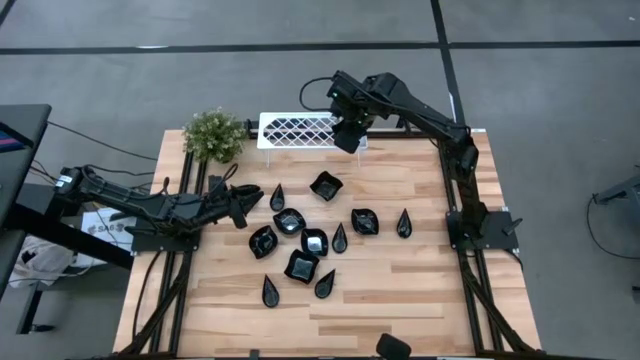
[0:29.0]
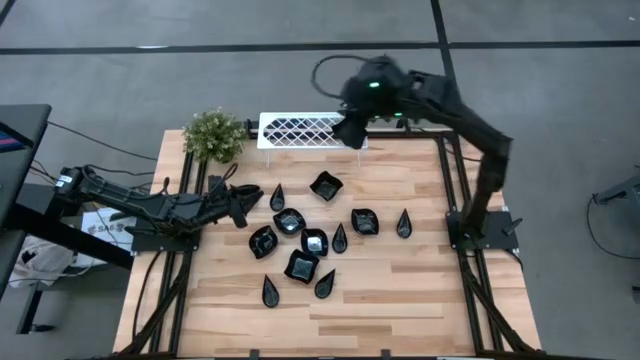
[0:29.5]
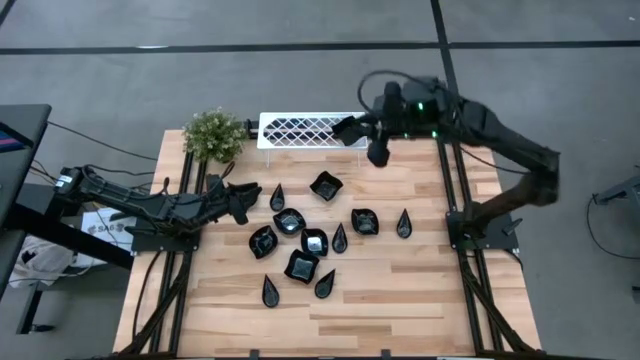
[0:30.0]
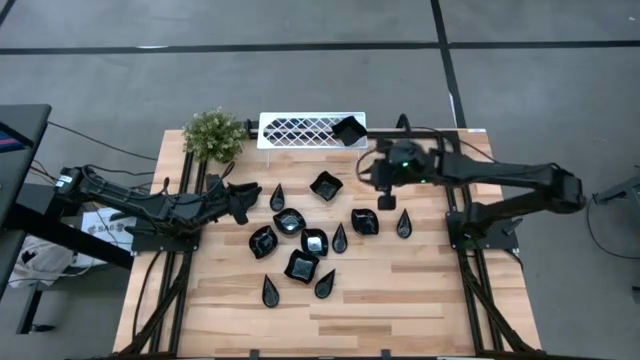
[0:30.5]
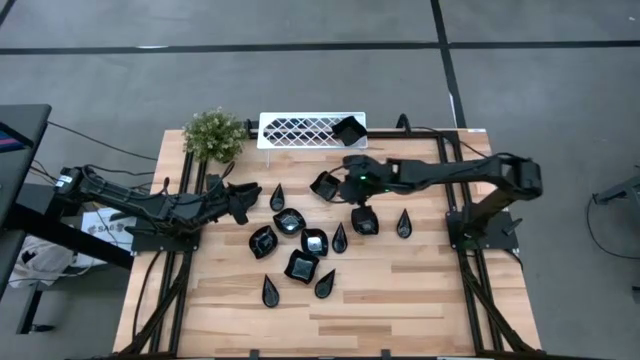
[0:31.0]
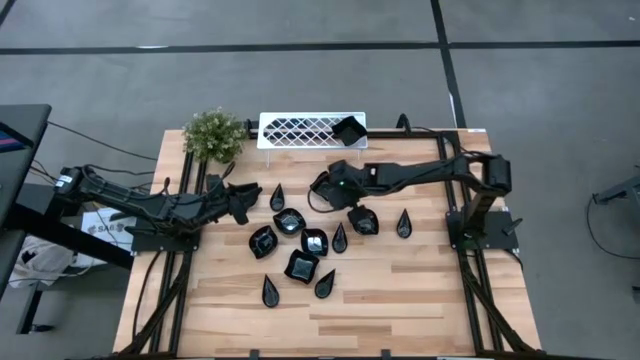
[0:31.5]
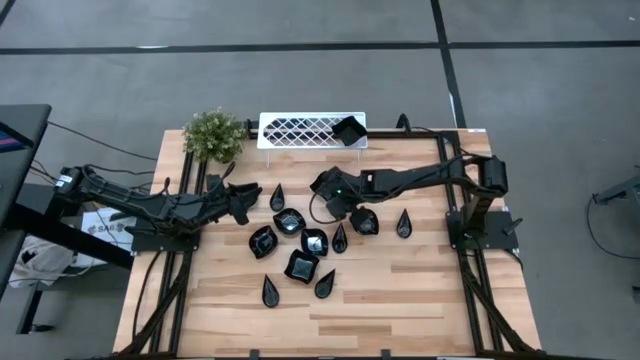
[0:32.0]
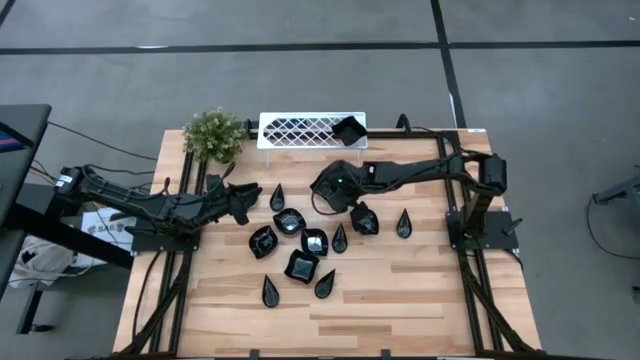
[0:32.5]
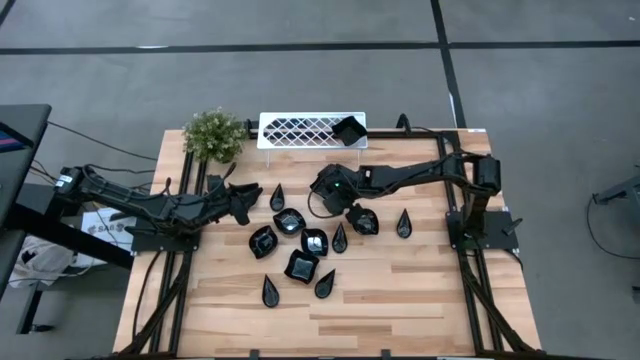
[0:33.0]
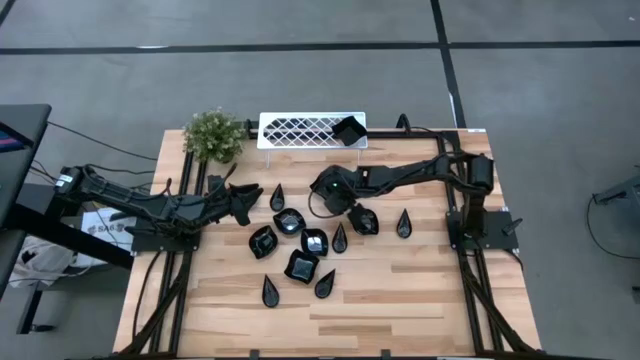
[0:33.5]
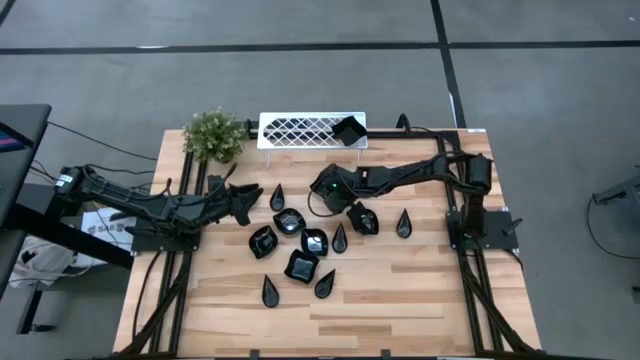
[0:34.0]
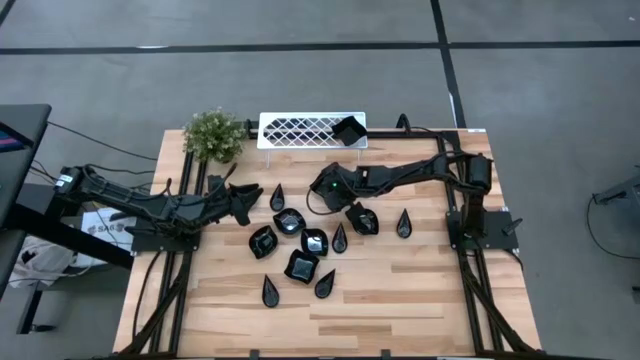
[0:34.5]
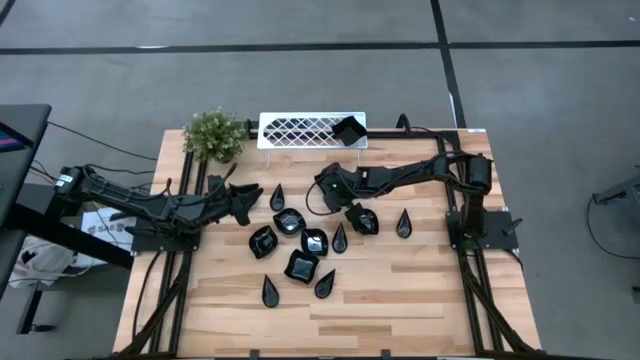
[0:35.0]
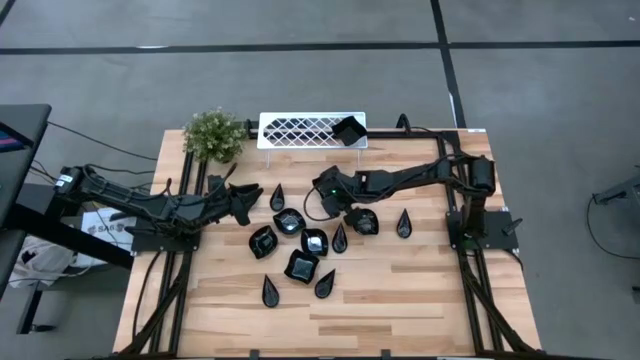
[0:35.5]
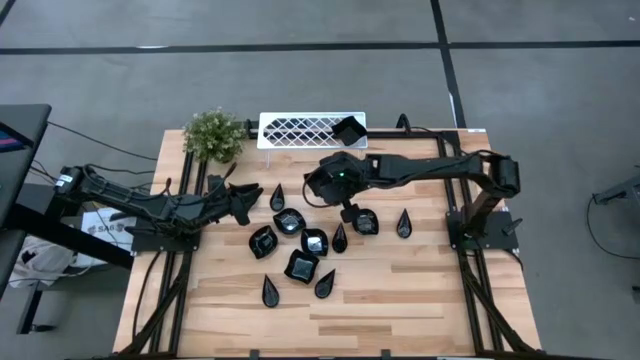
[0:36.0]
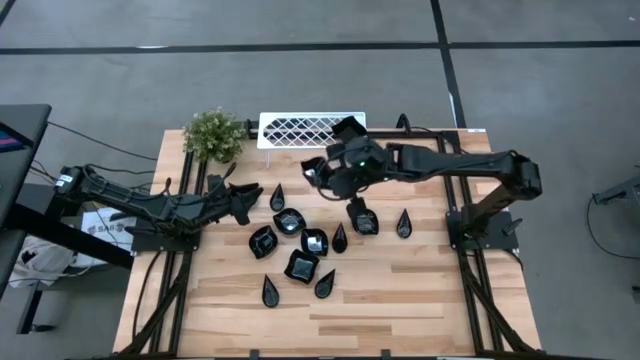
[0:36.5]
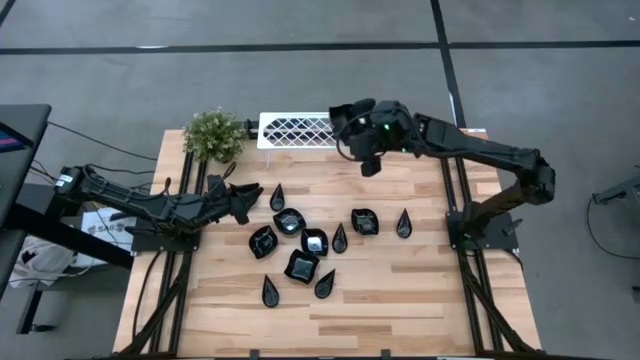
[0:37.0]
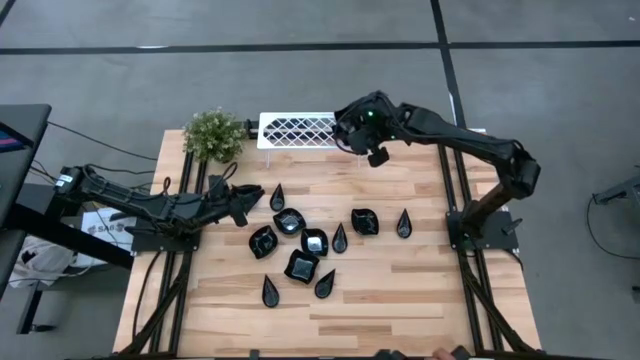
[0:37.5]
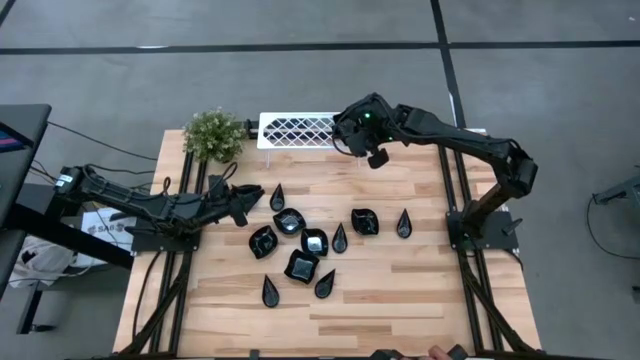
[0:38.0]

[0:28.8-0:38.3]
Task: Pick & Place Mini shaped plates
Stack the top right distorted square plate on the top of the distorted square plates on the shelf

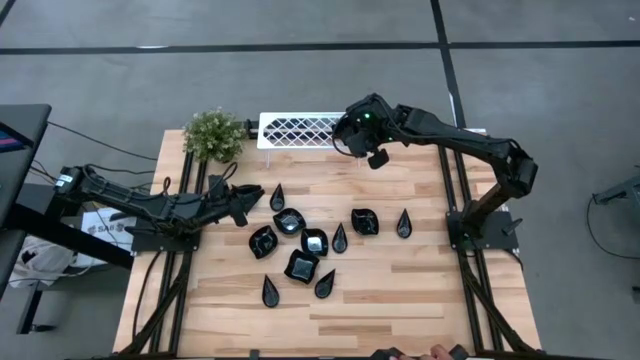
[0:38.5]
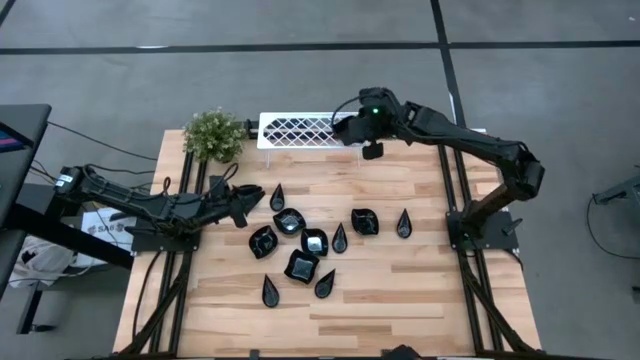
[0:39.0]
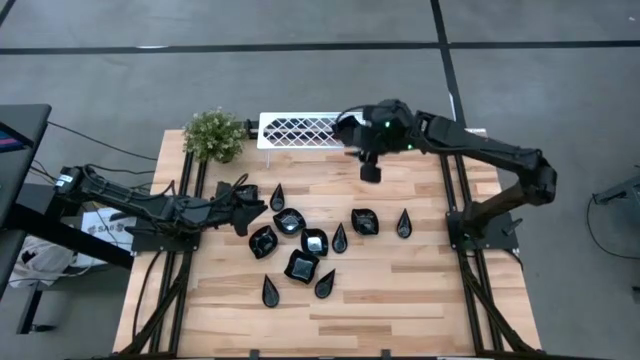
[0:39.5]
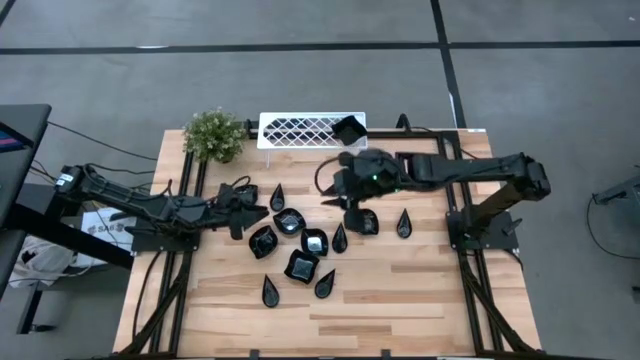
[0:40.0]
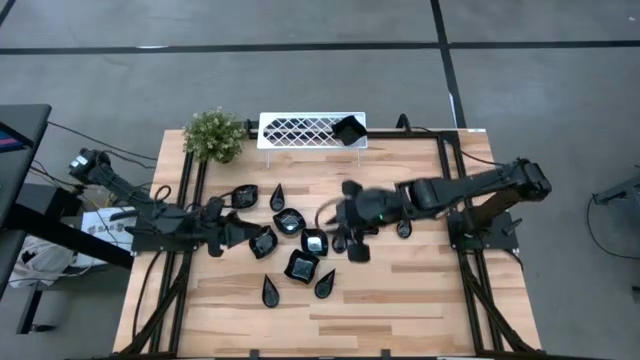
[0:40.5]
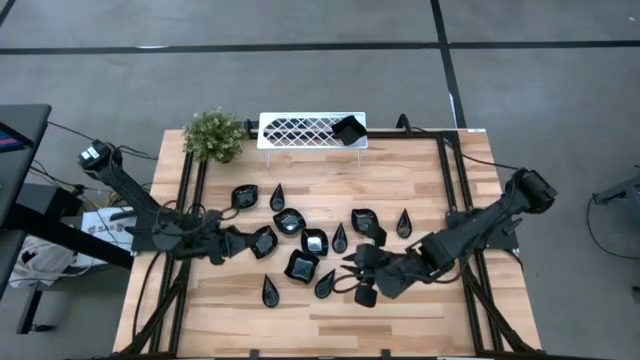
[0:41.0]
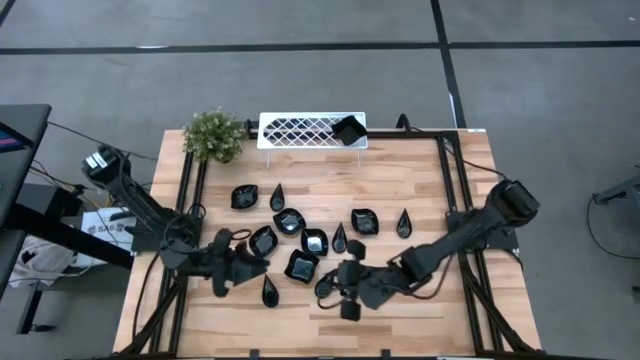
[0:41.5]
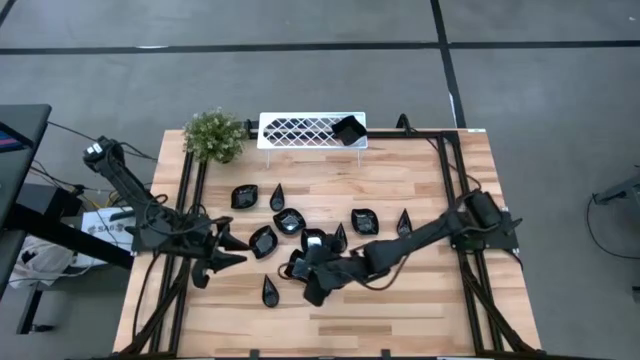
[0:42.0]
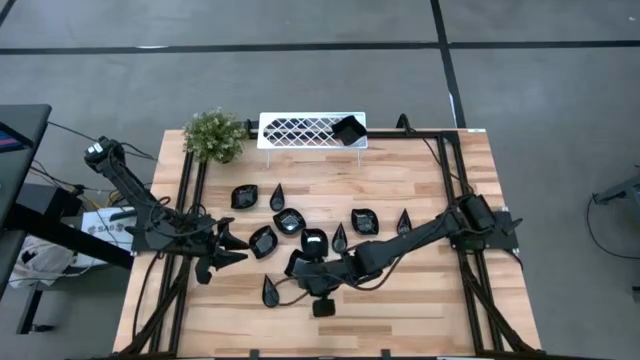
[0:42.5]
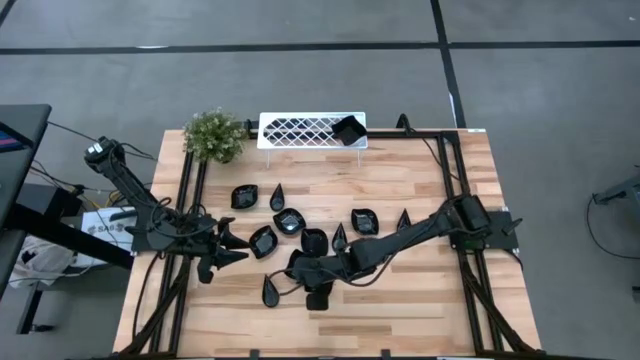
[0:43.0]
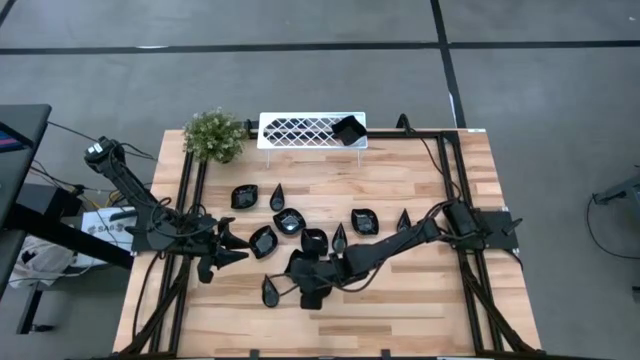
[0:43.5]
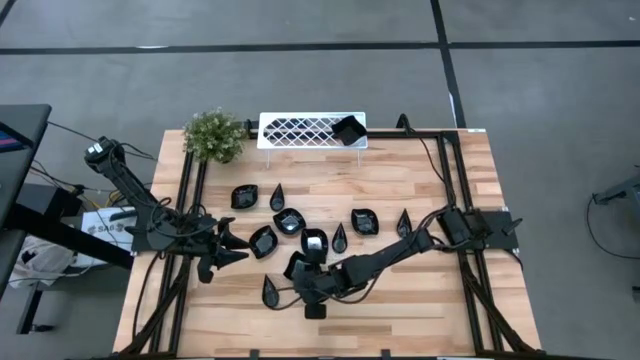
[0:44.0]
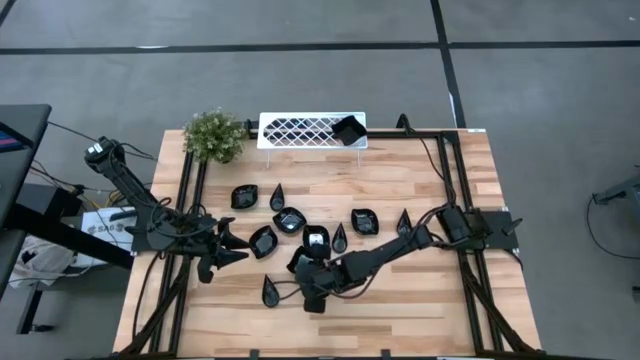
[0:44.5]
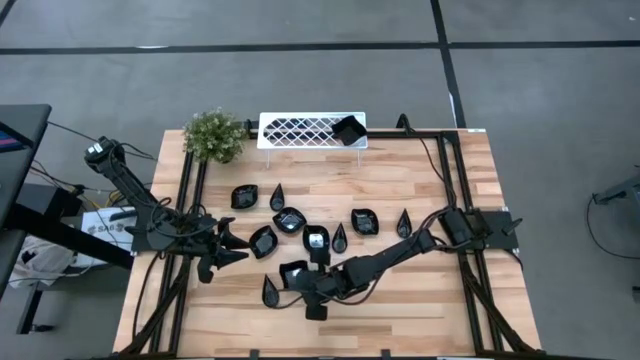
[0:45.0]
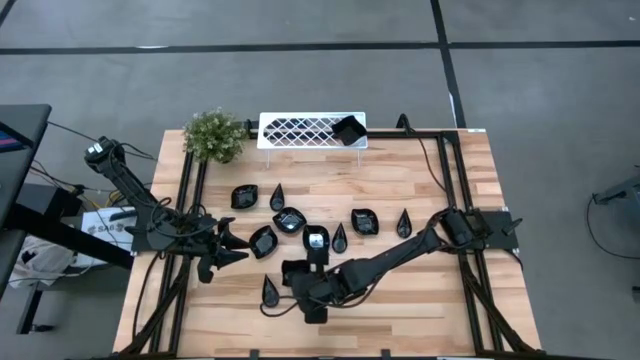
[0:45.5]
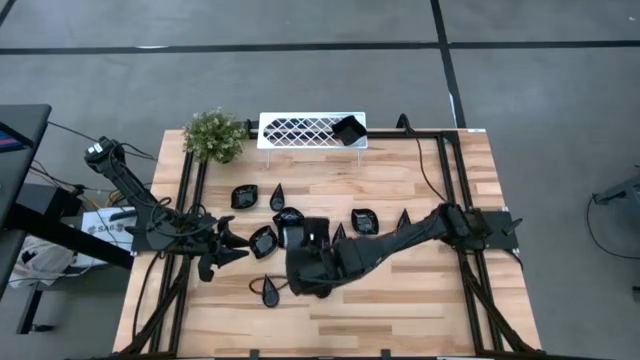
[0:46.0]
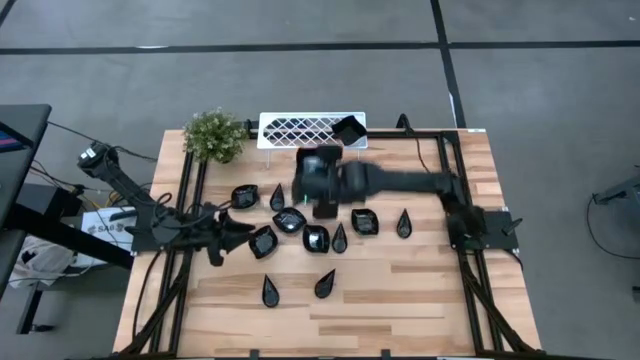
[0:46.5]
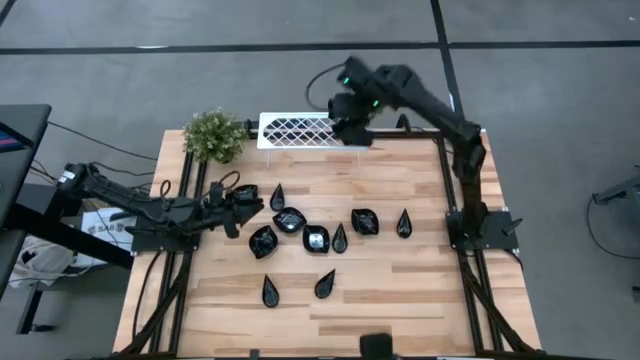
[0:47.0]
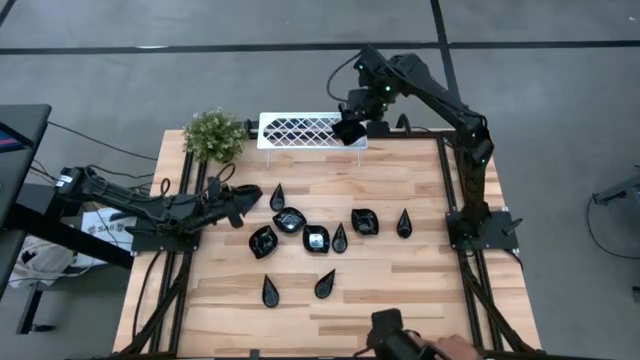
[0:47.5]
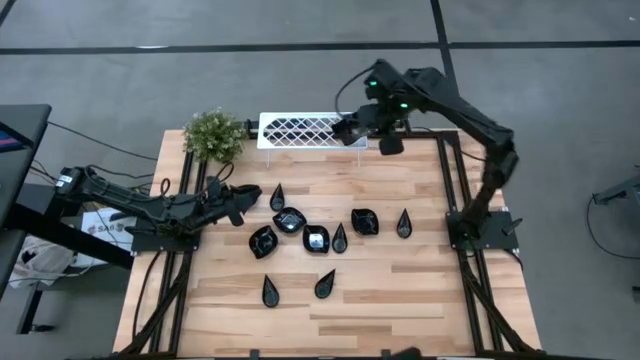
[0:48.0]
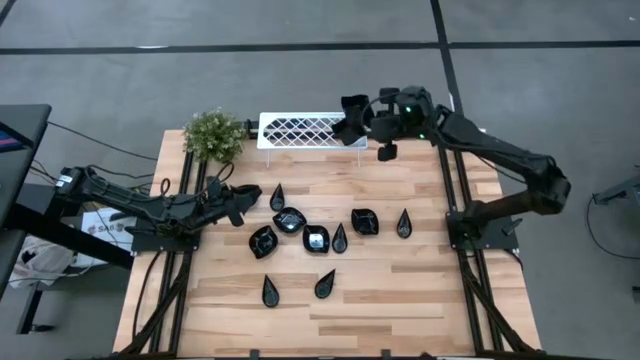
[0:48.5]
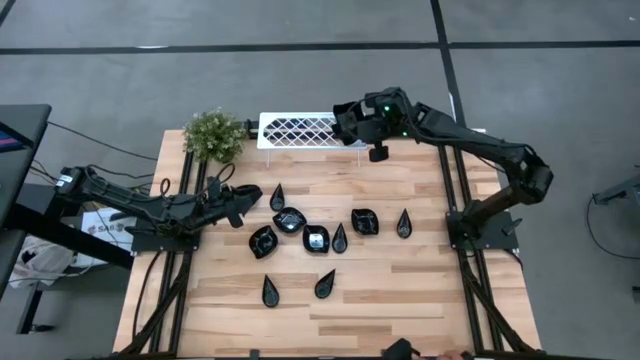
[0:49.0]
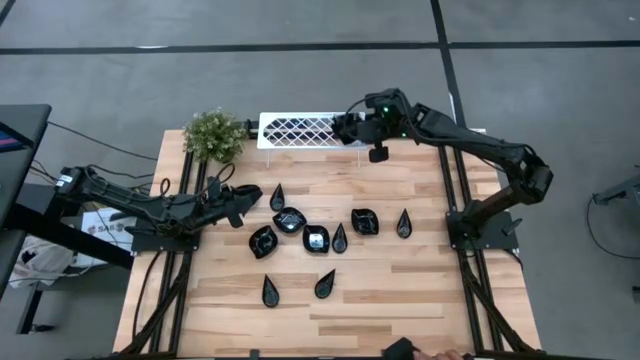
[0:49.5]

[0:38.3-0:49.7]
Put the distorted square plate on the top of the distorted square plates on the shelf
